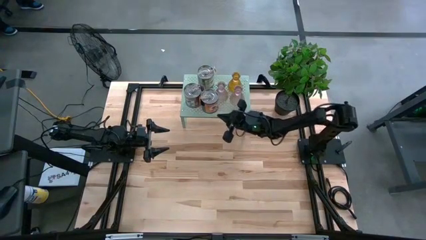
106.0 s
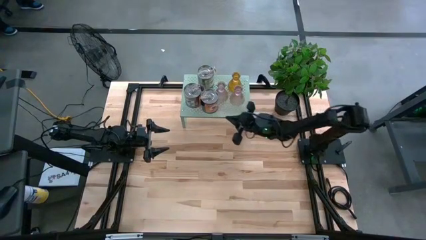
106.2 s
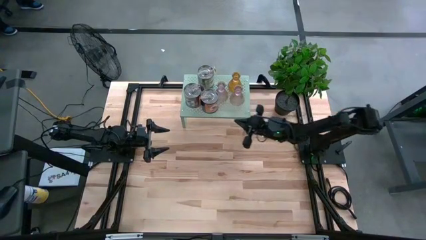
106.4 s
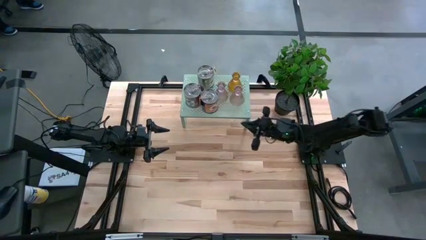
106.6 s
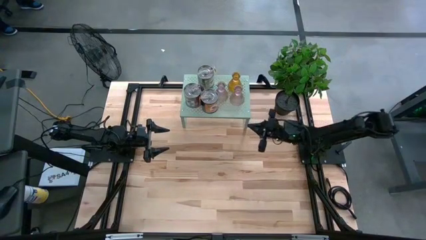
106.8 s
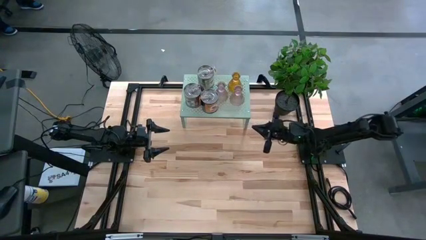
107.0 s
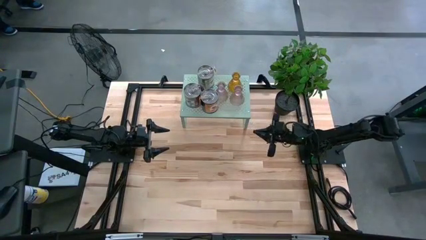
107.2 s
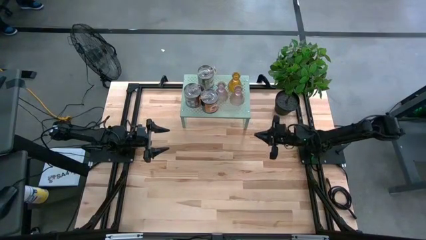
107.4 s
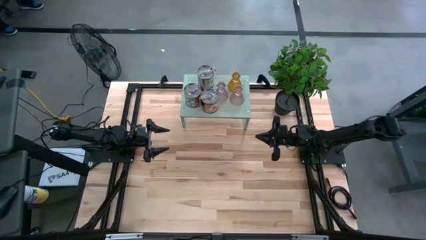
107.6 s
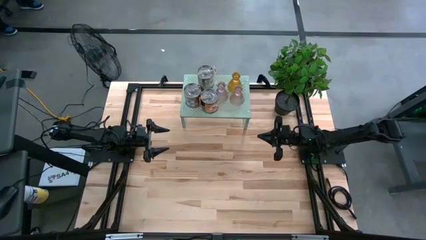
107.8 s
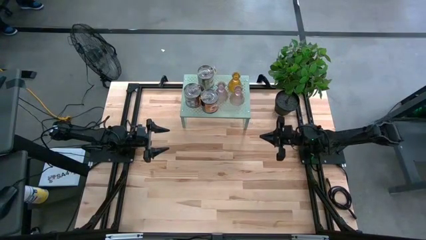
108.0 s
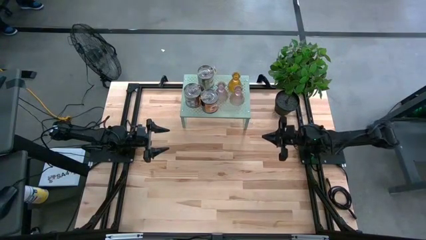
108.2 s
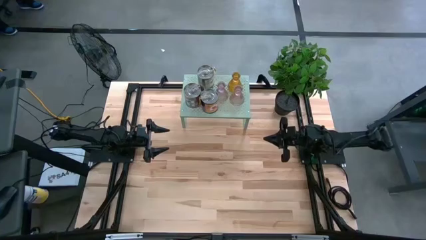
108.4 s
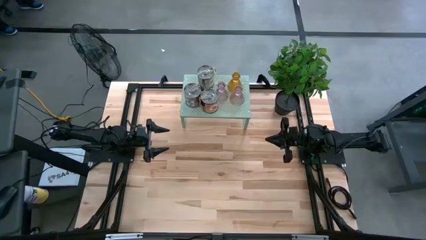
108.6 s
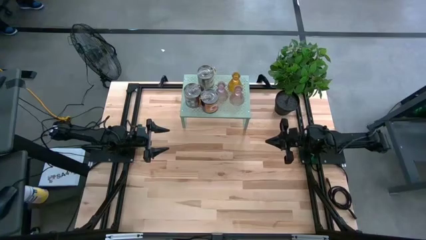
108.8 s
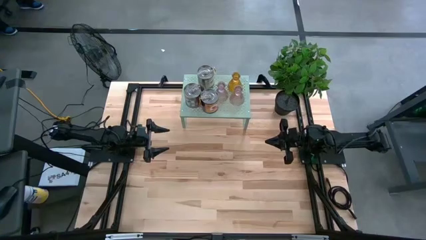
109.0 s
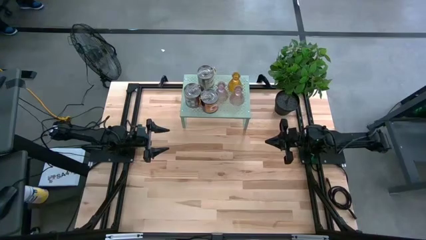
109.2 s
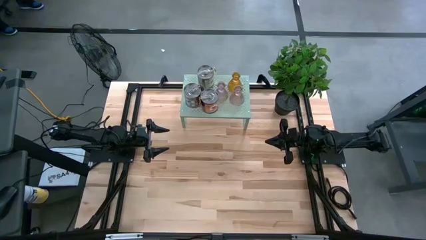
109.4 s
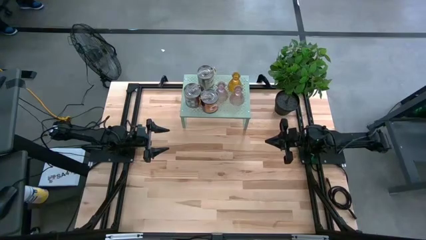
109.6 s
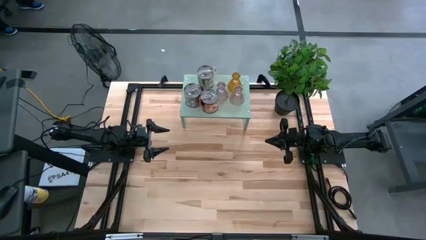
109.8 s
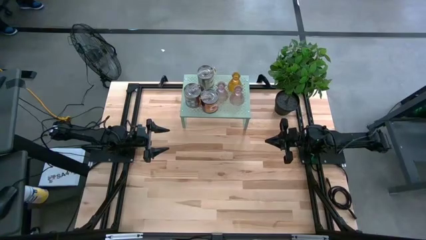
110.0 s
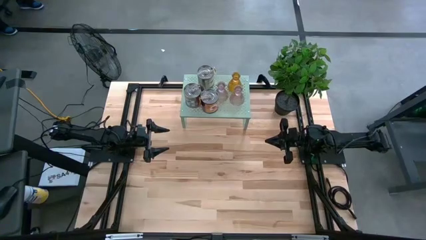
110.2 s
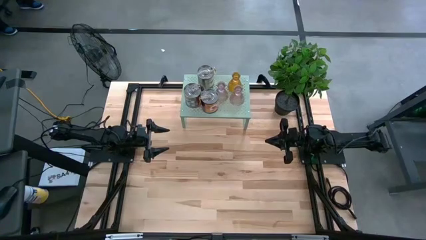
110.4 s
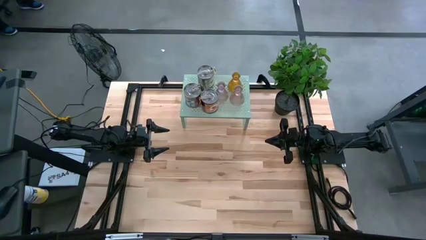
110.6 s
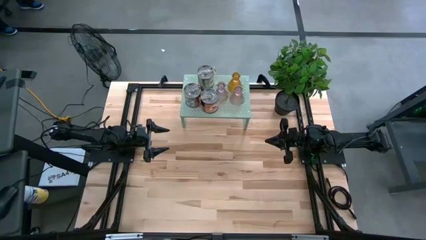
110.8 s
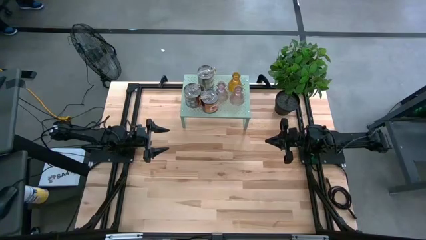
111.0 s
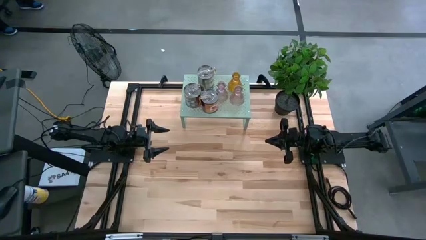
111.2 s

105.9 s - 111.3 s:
Task: Pick & Place candle stick holders
Return to Home Position

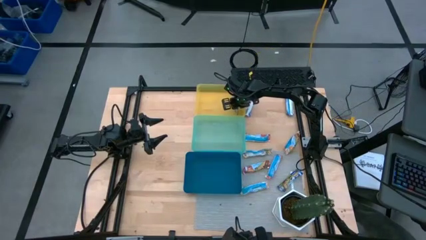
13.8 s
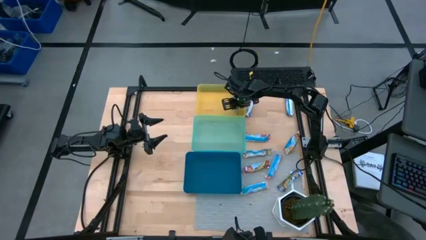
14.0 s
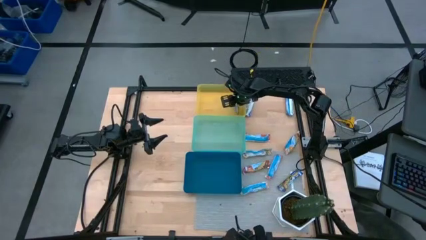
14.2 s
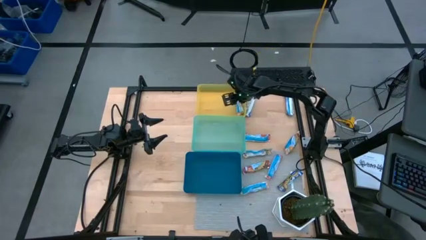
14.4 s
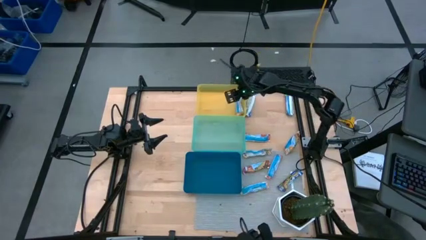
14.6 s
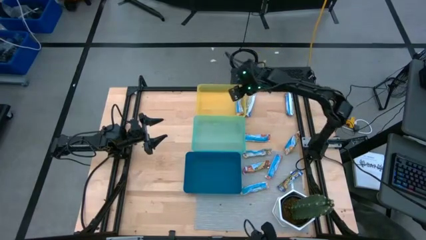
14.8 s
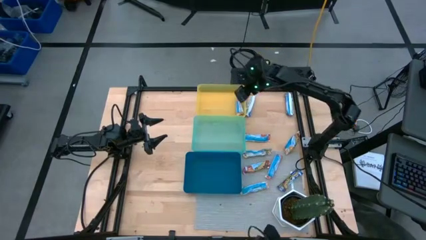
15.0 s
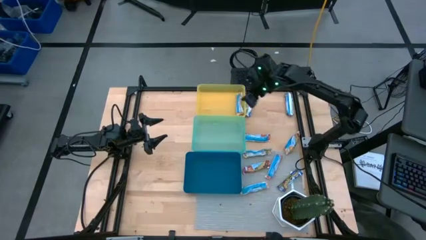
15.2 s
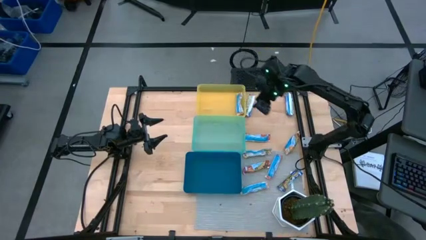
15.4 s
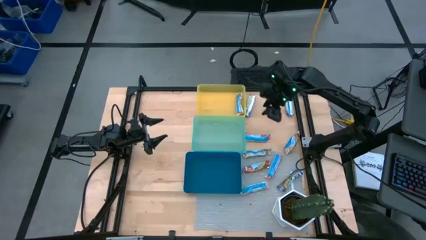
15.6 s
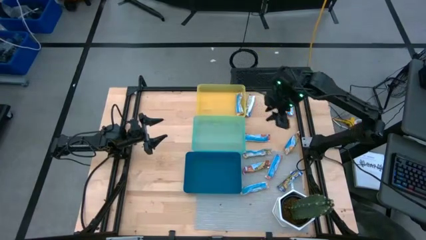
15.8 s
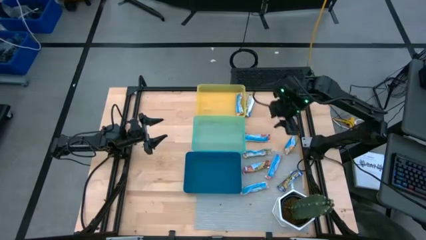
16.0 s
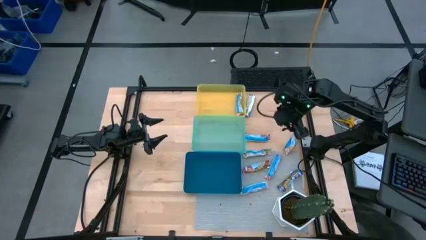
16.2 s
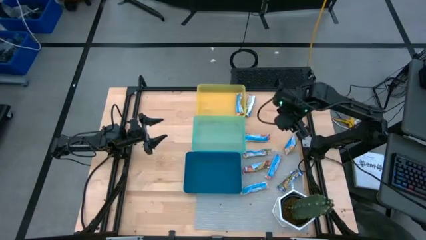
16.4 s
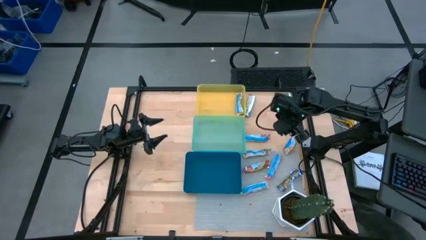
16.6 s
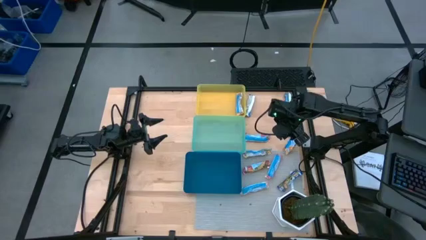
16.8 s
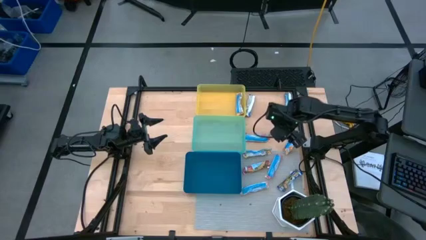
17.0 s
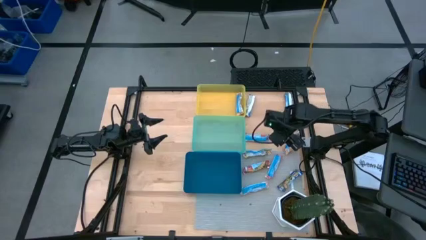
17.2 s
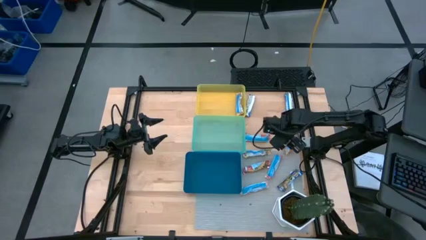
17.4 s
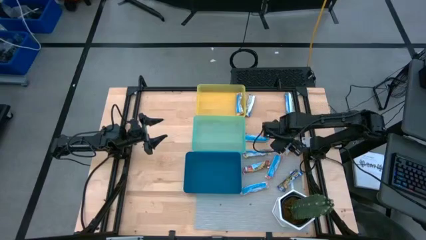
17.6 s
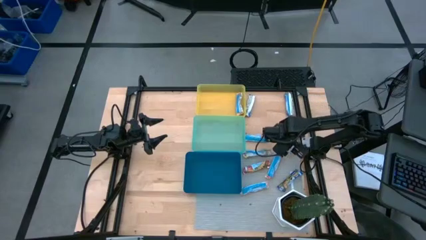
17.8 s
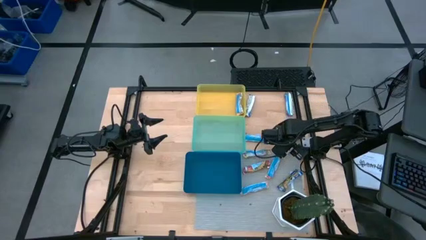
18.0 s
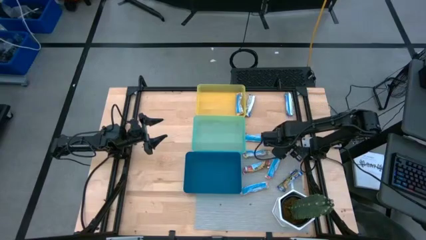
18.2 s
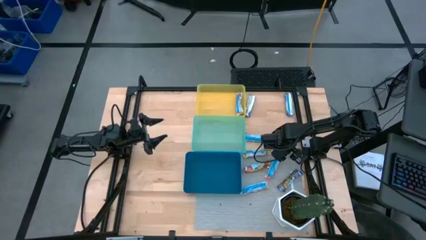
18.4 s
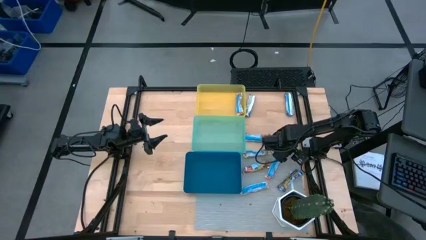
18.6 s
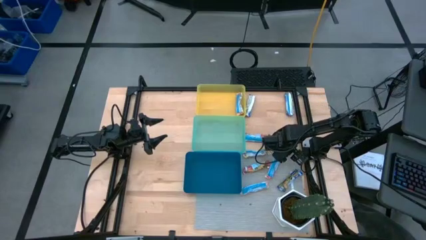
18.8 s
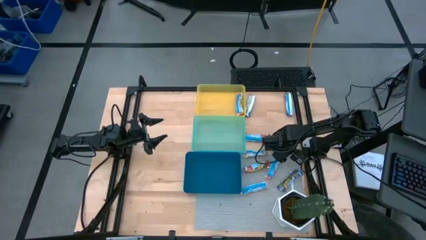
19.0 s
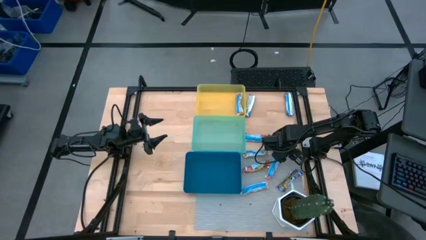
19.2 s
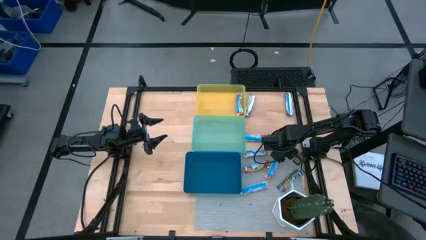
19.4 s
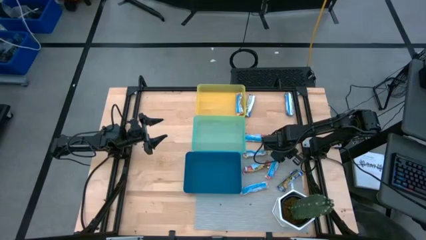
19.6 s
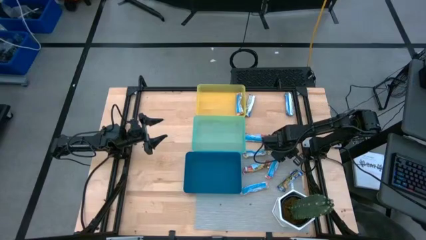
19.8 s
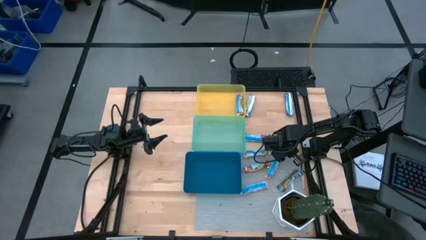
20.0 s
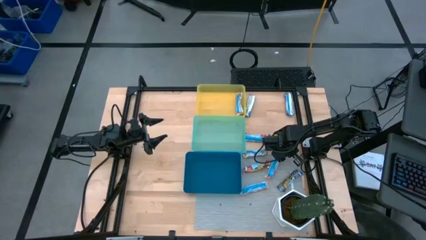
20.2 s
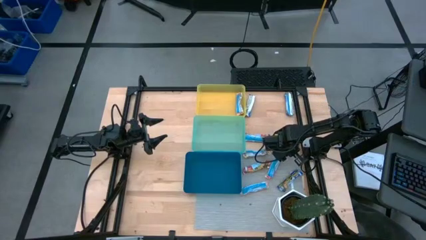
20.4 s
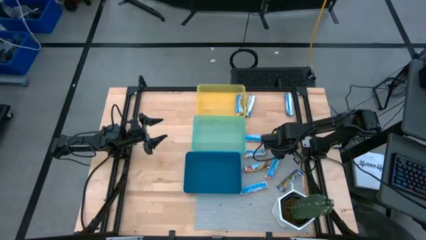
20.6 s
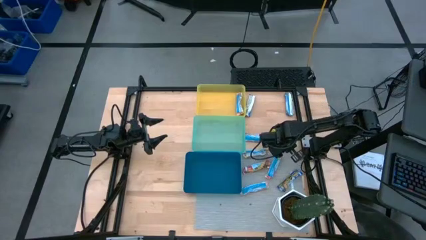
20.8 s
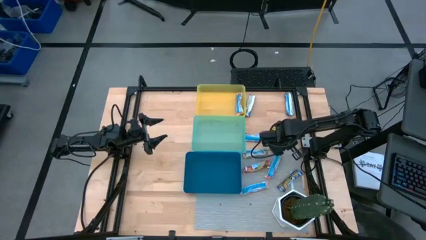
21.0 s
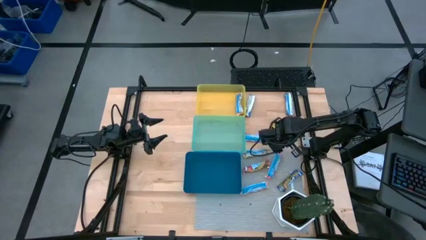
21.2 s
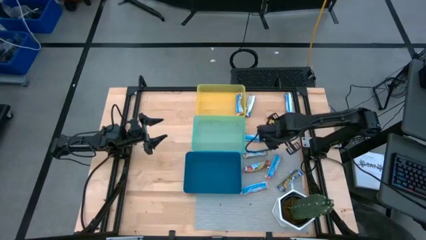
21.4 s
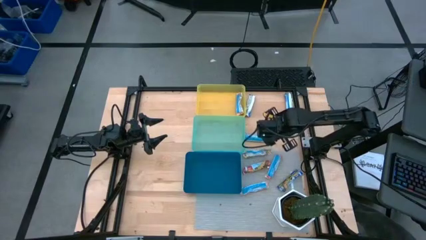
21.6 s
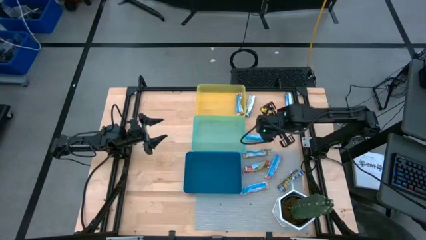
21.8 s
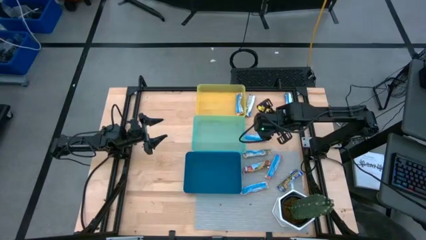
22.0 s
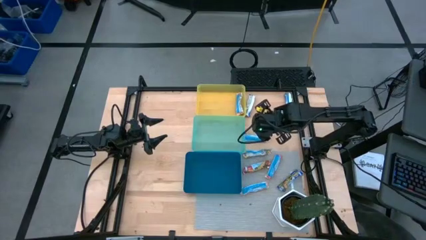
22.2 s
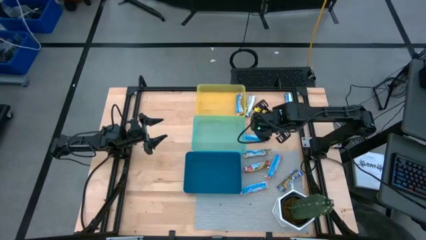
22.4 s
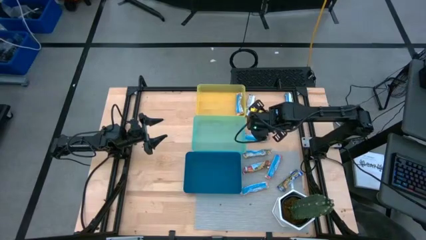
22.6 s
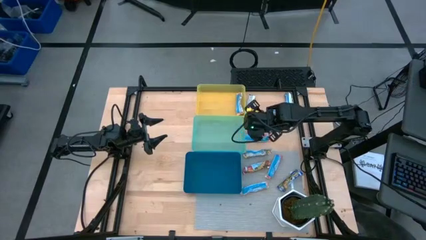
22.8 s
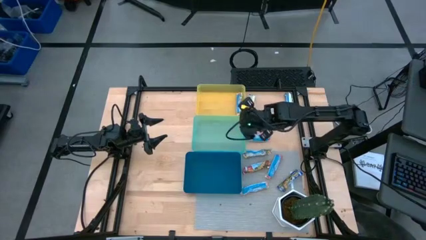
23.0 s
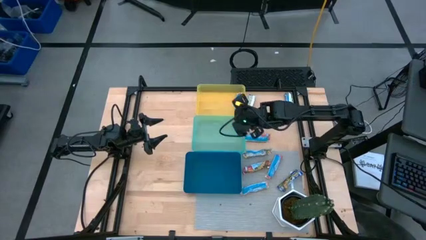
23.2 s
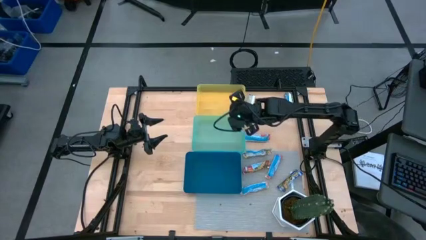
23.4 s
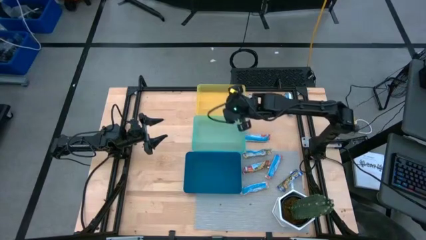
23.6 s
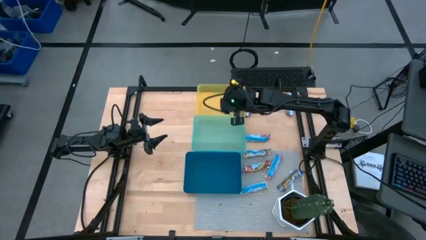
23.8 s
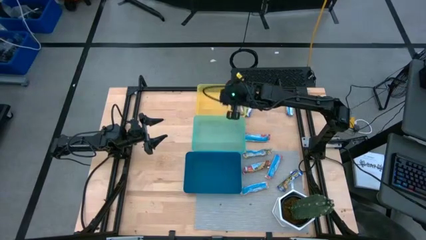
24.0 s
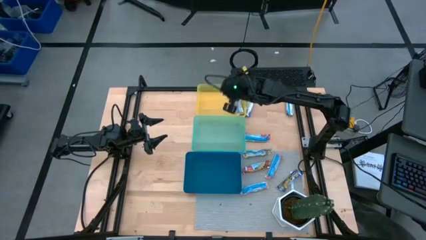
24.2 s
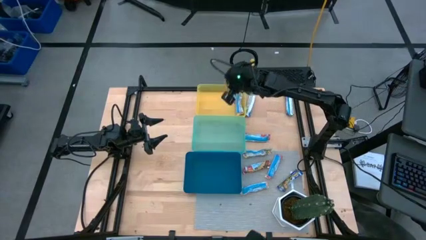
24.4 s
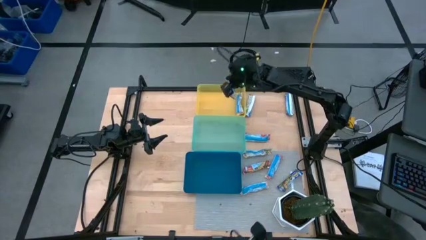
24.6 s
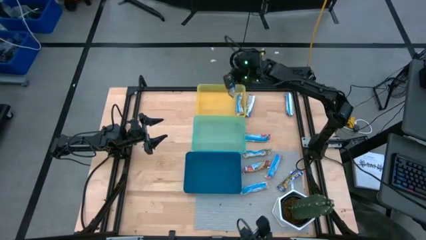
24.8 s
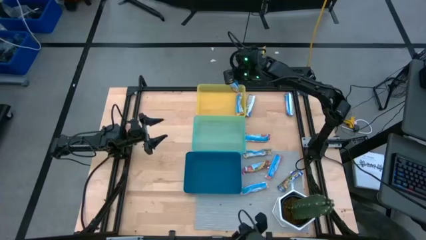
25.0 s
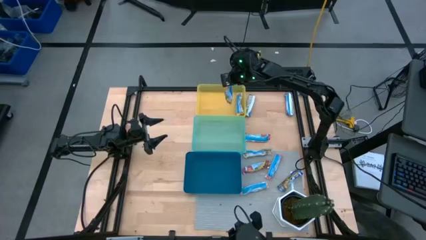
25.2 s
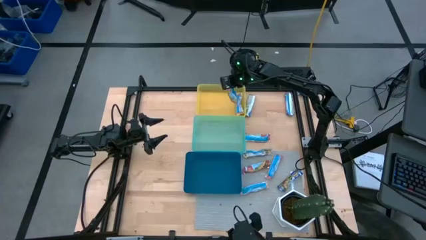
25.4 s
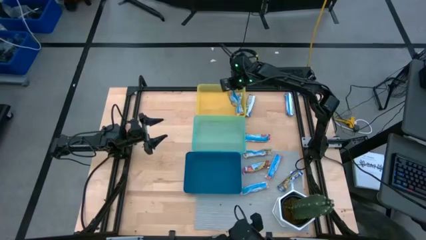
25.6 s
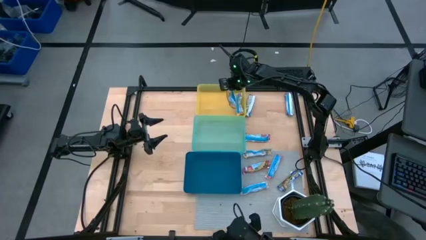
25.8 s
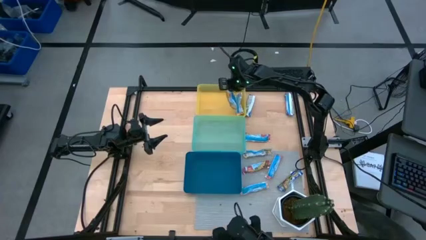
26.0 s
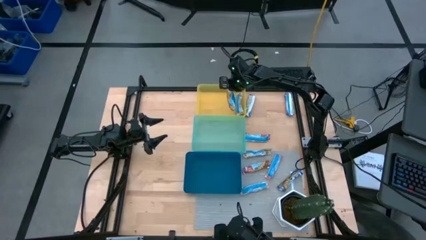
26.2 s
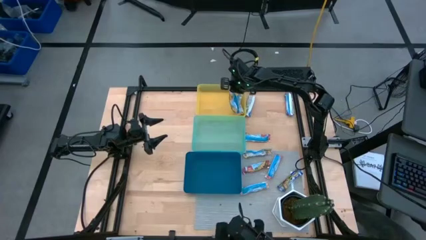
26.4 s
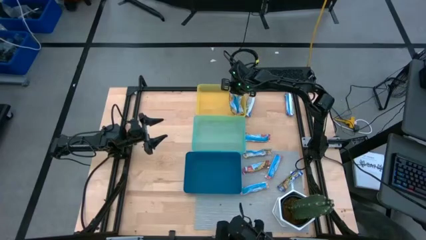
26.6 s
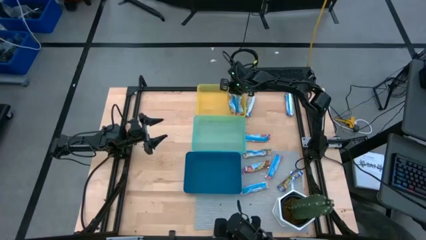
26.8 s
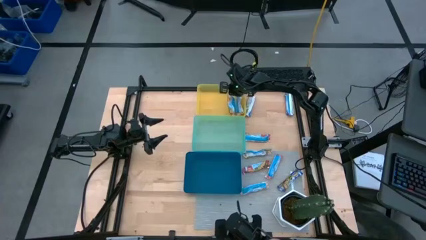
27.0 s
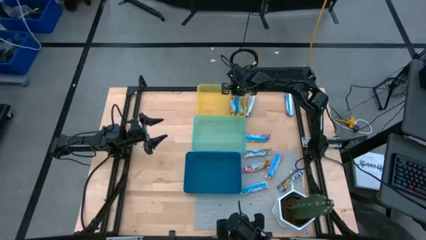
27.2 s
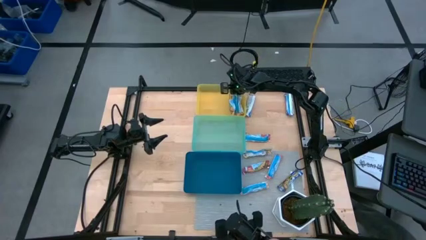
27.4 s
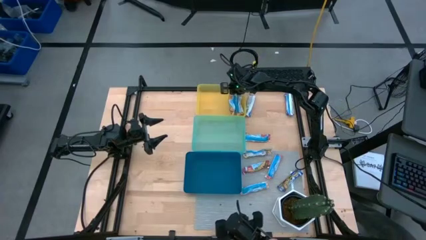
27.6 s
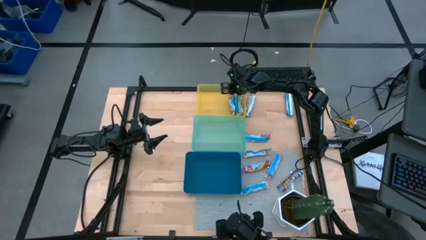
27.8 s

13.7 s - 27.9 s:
Task: Pick and place Granola Bars by type
Put the yellow granola bar into the yellow bin
